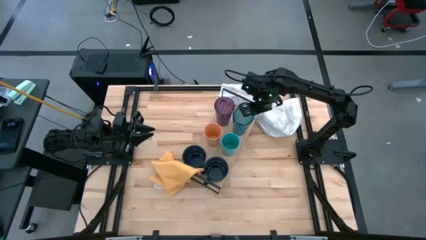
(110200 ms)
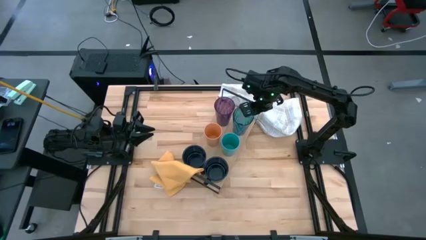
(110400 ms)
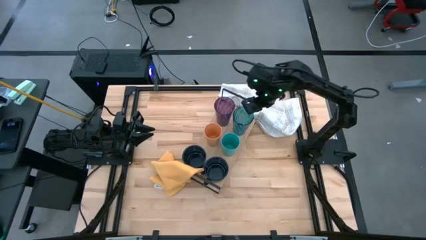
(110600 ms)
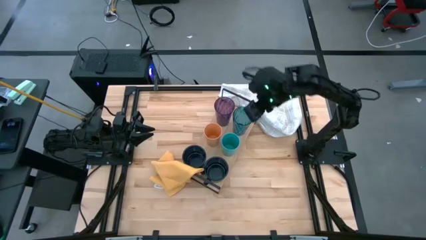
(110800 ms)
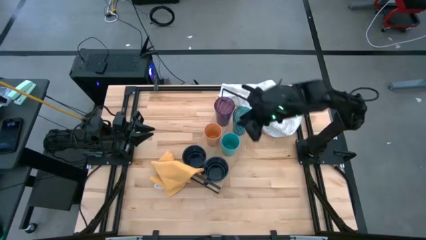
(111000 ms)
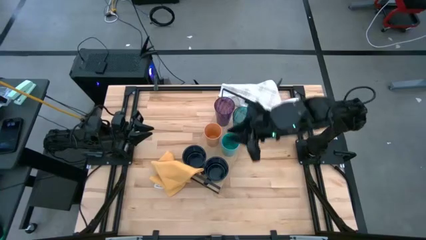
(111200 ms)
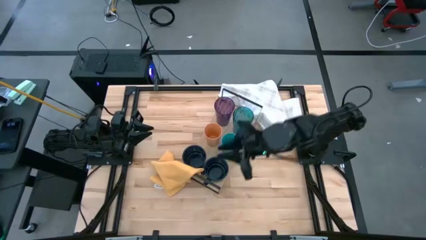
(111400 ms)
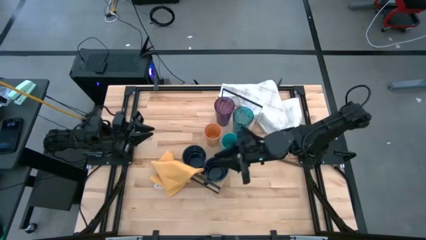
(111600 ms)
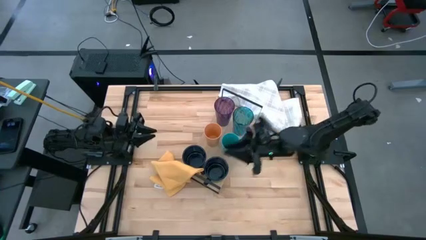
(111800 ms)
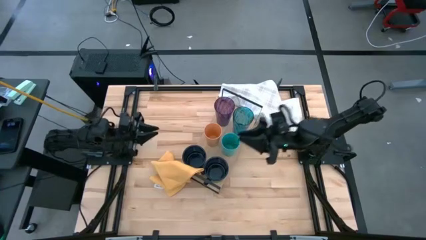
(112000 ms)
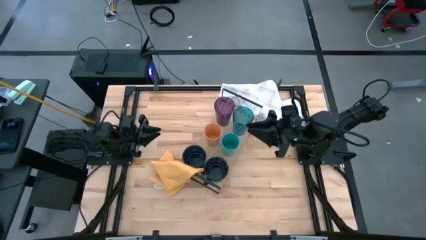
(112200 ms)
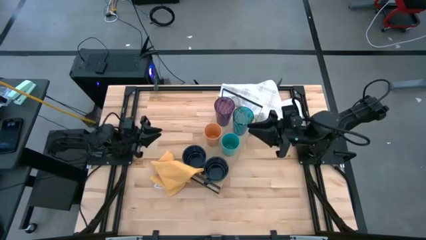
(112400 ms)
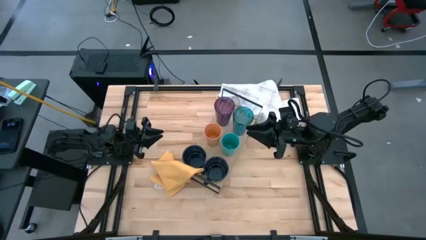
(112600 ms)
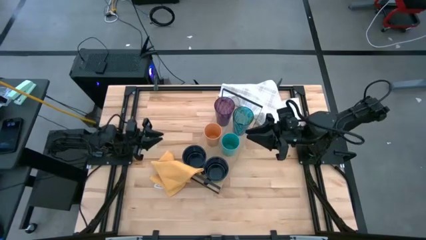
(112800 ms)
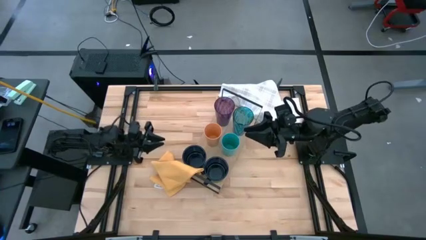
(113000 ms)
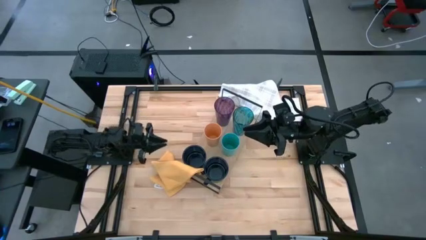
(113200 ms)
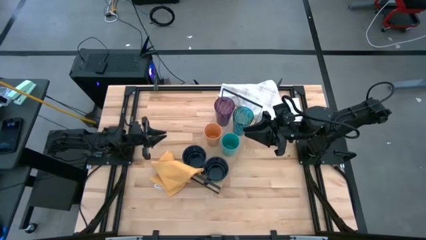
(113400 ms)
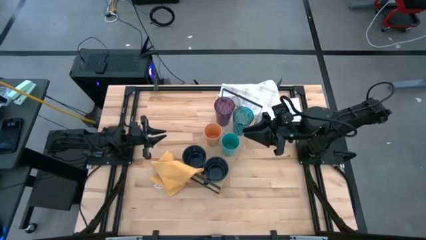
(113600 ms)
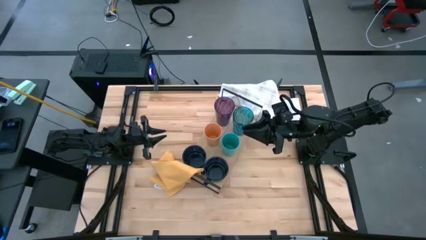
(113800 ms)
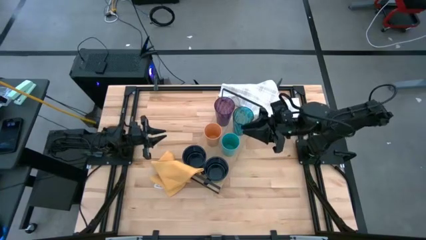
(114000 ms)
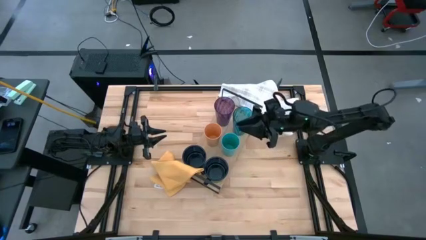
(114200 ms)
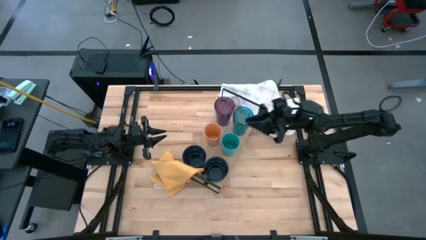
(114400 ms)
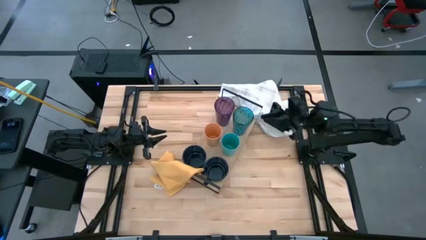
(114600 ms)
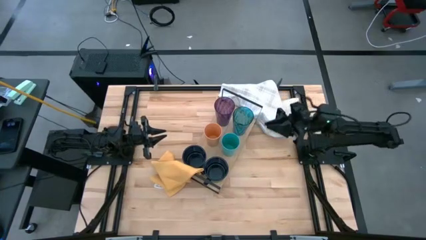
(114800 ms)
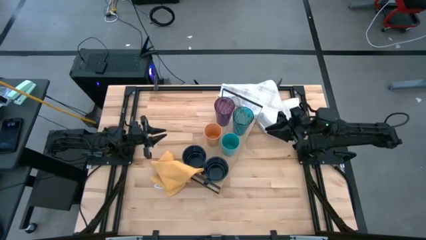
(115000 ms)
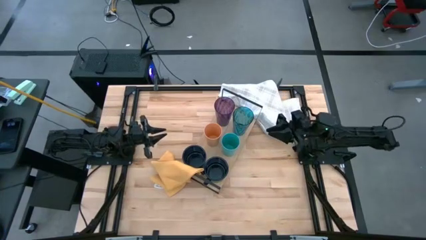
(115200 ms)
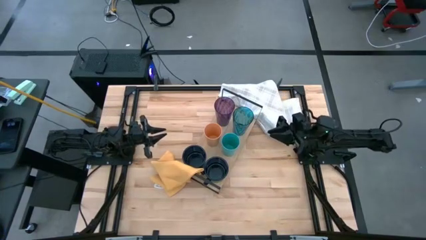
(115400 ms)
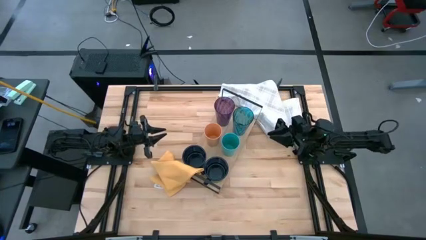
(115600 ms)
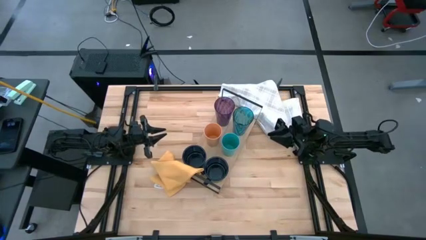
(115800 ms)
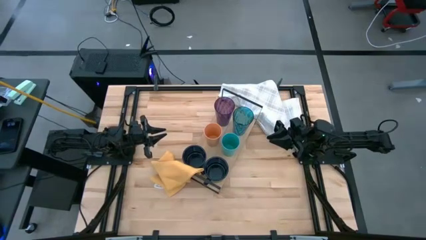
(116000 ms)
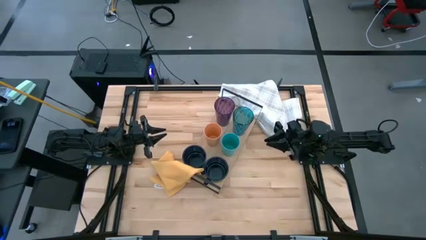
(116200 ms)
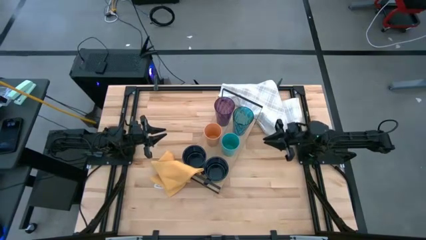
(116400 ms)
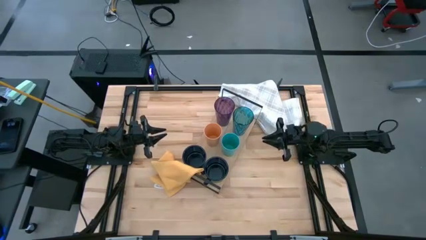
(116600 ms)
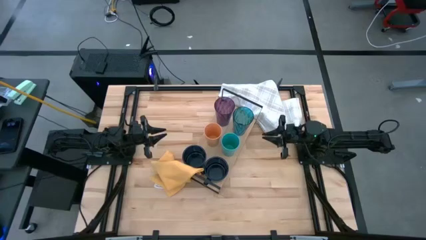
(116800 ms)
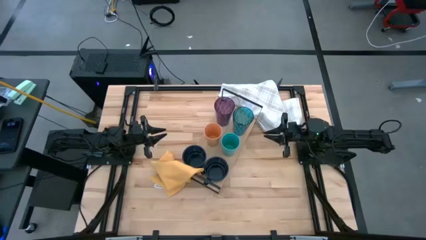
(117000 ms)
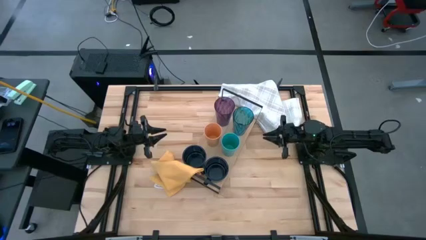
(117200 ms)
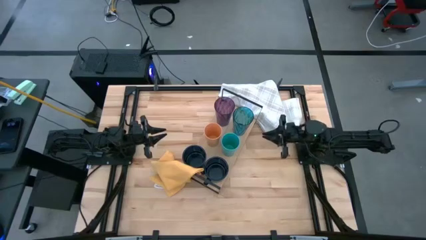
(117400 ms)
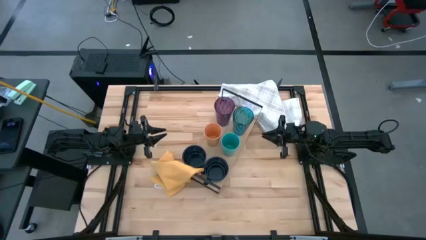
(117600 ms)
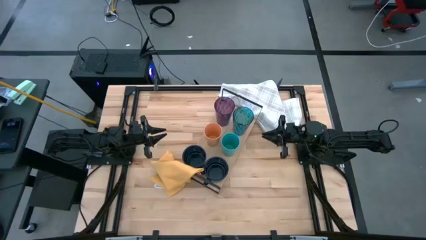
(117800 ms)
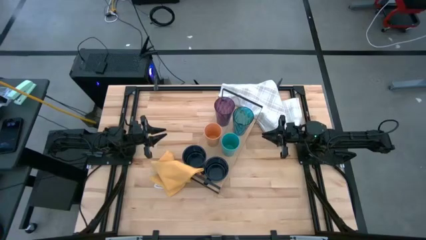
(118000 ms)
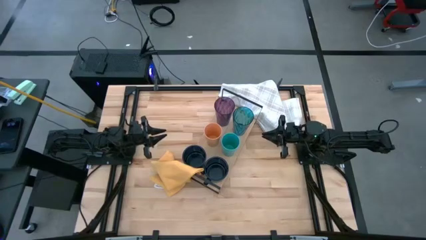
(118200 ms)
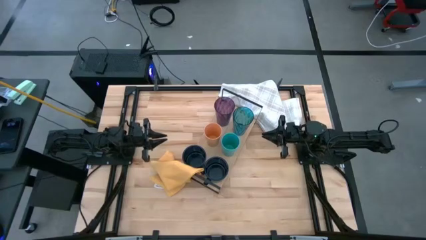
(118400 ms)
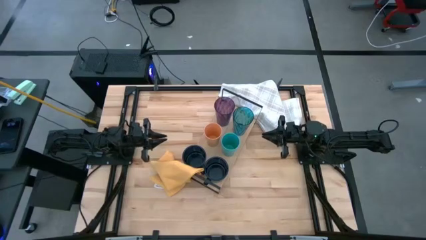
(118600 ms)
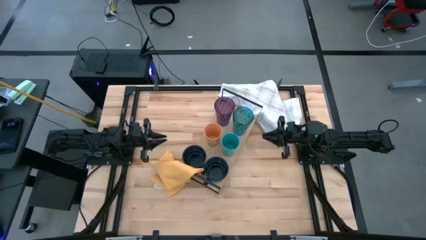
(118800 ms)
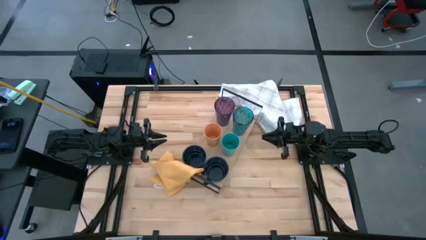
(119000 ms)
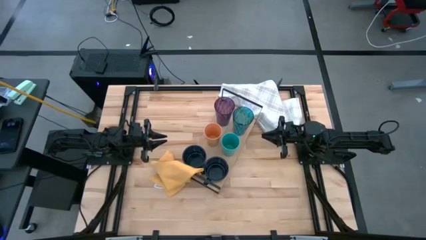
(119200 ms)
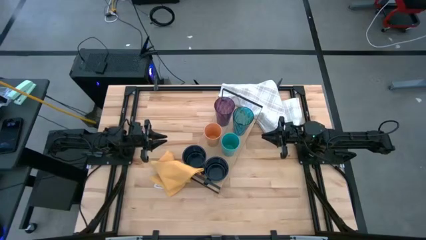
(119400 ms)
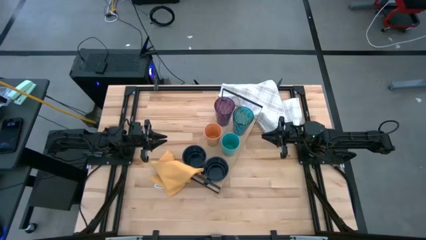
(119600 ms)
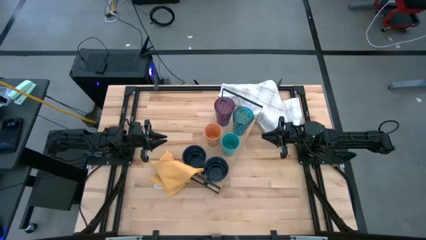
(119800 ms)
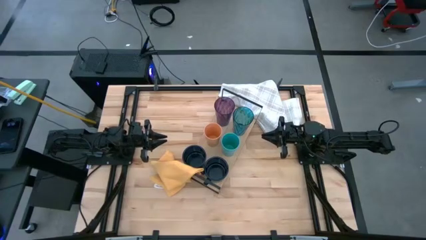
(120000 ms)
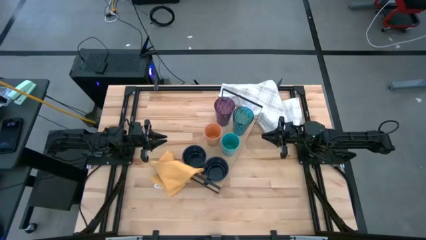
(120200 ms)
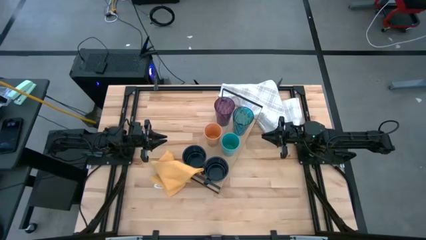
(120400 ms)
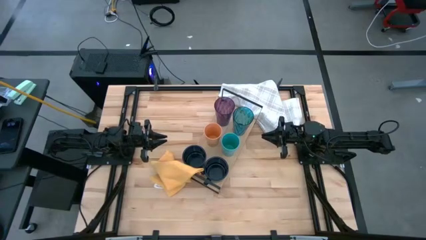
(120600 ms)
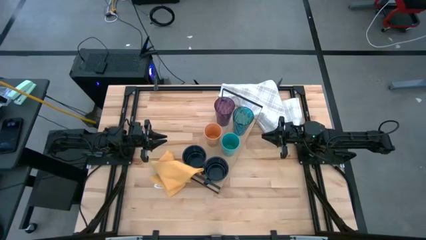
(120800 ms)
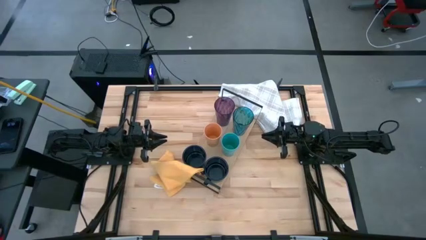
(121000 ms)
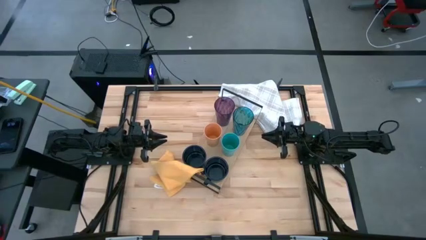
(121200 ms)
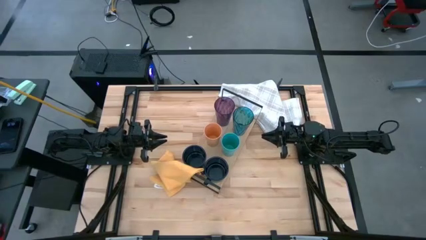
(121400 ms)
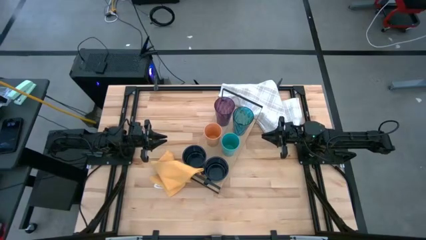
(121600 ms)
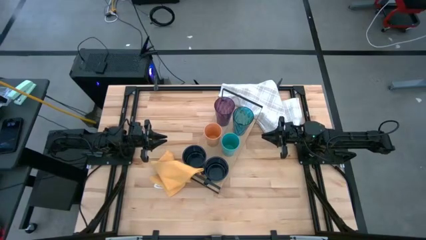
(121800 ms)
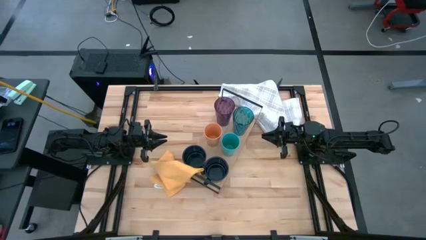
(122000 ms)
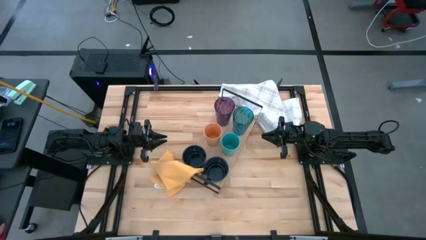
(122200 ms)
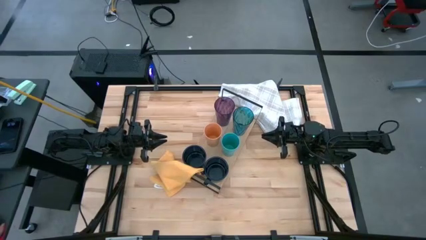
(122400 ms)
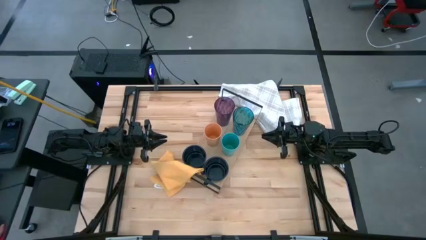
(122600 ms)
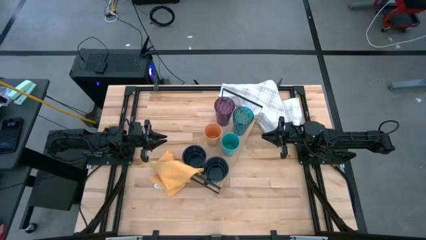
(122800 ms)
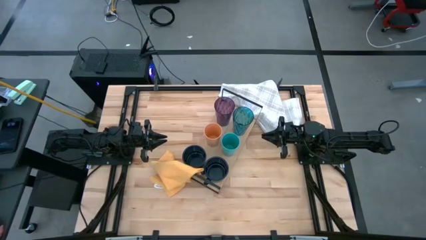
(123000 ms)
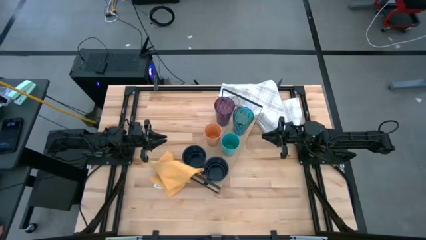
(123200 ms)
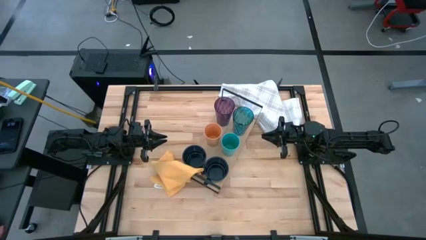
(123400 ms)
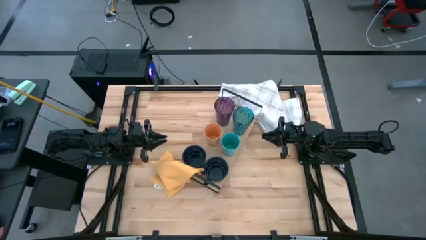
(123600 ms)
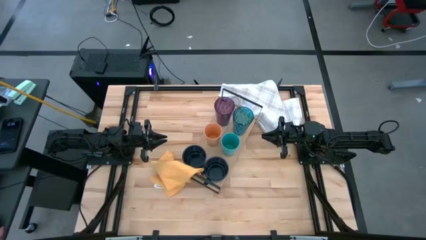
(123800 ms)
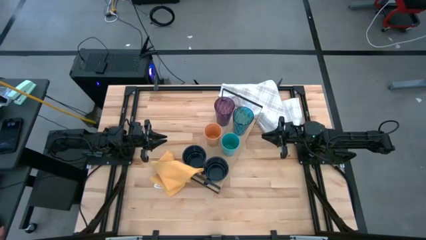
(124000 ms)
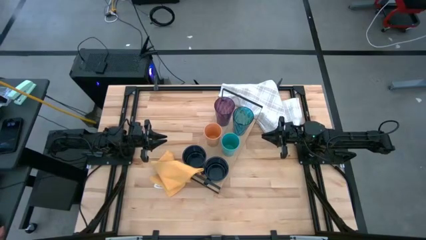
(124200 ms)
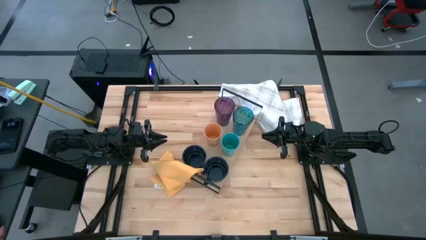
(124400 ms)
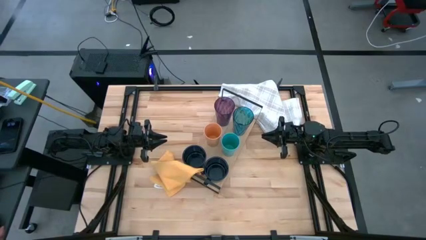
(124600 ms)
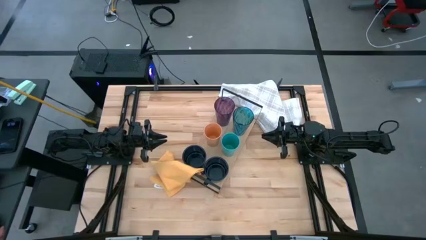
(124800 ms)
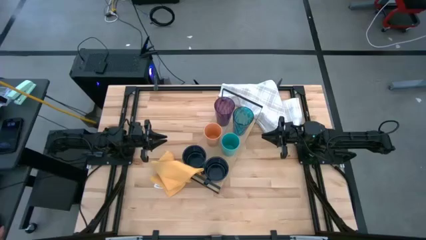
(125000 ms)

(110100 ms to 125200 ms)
Task: Stack small to large cups/mugs on shelf
Return to Home Position
